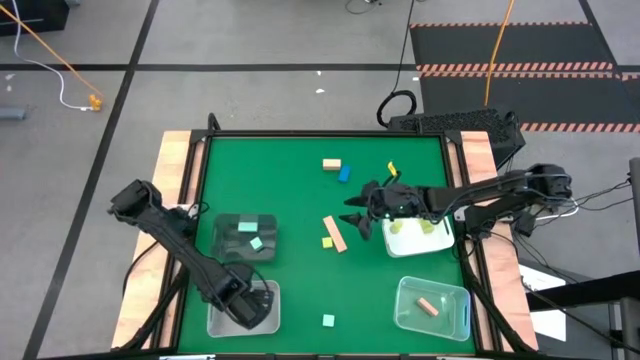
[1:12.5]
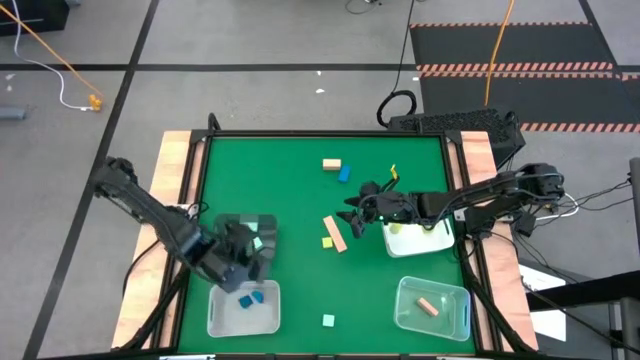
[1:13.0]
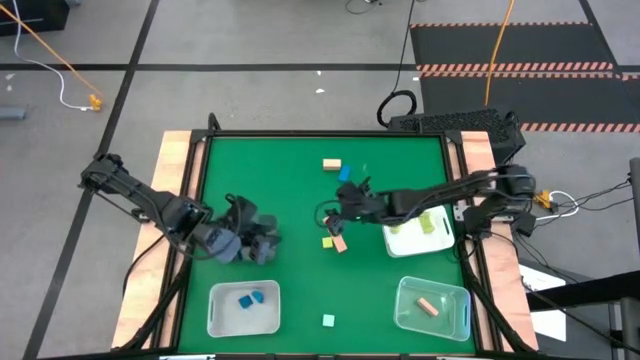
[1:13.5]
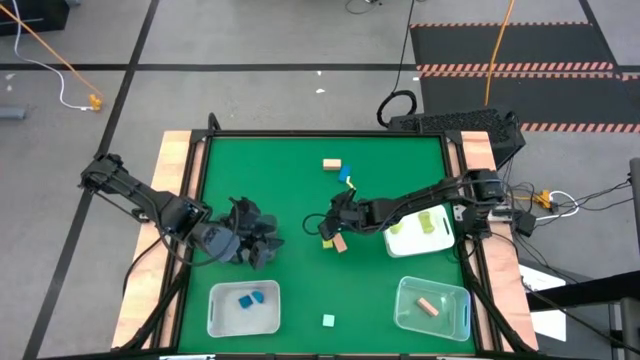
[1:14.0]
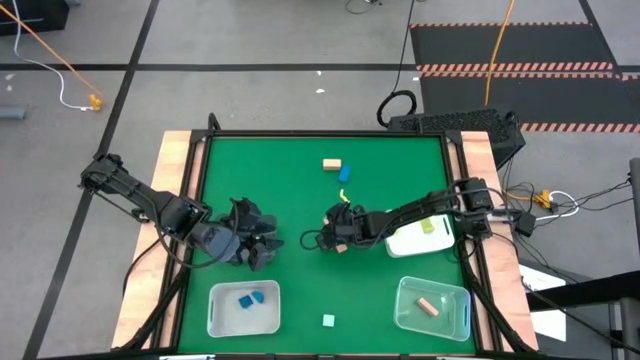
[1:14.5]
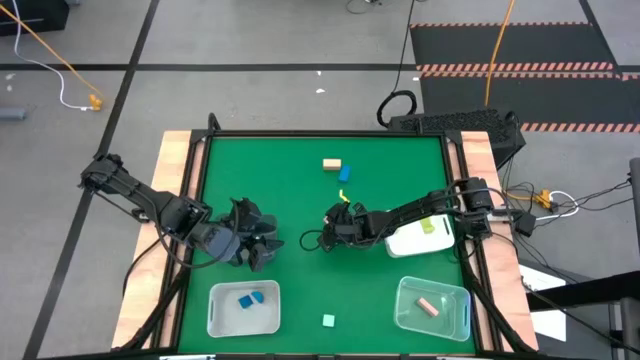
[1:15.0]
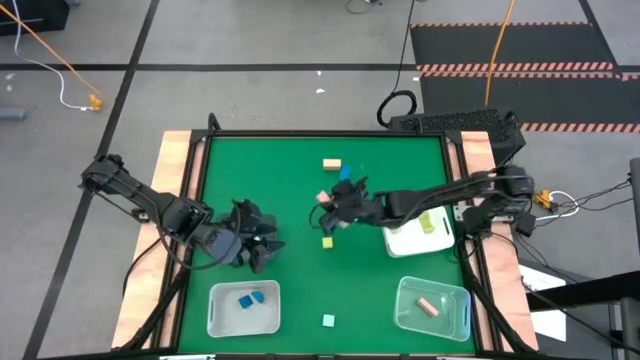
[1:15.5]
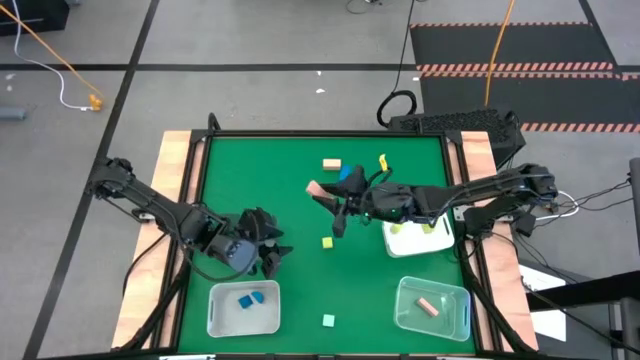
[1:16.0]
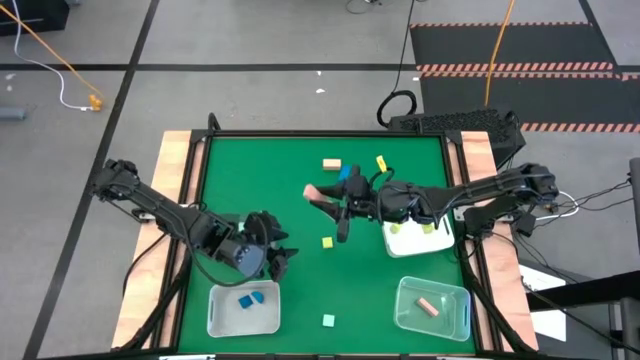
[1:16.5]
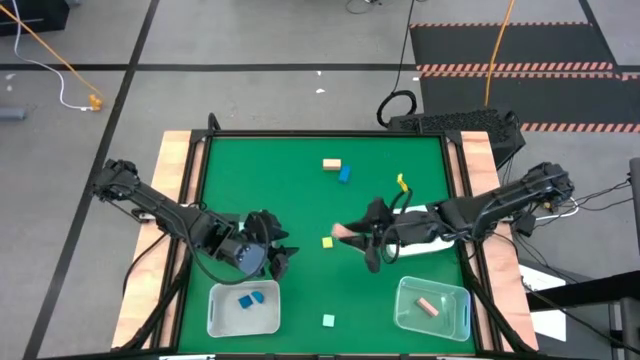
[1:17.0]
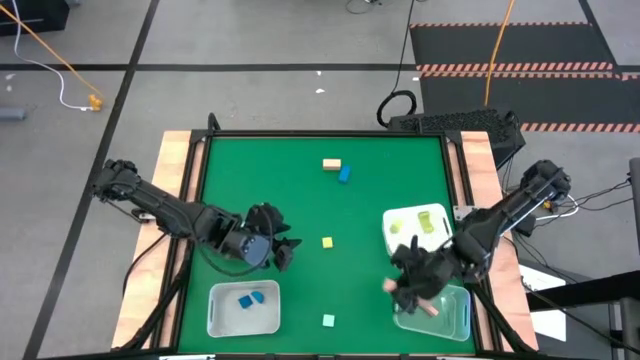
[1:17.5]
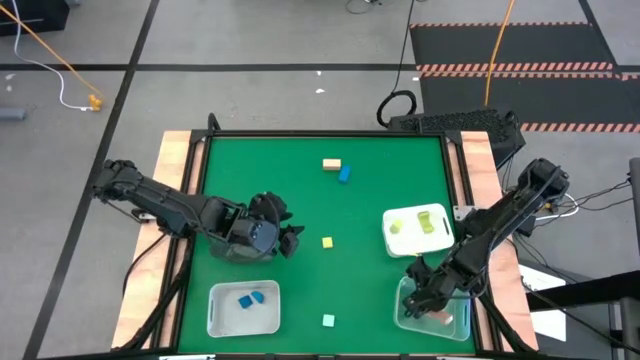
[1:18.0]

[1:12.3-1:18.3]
Task: Sort & place blocks by color
Put the bottom brown block into the bin

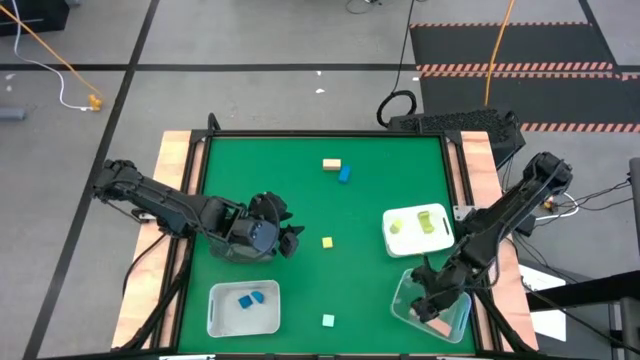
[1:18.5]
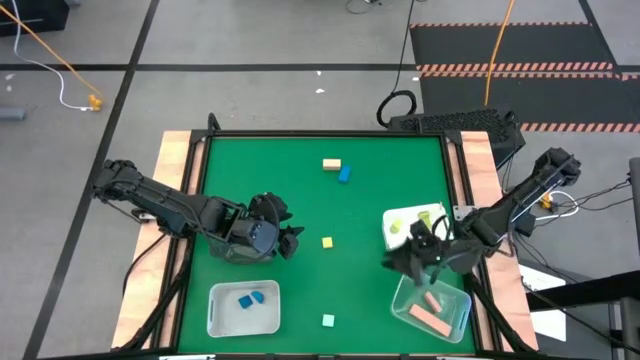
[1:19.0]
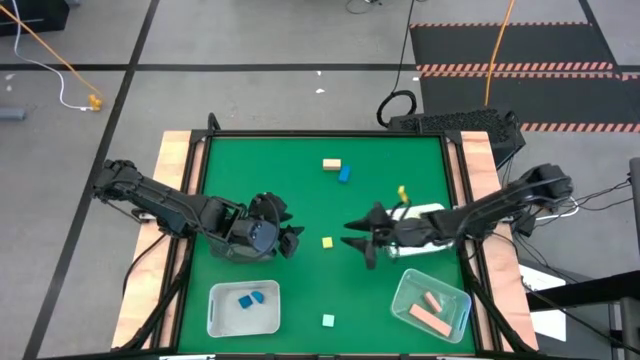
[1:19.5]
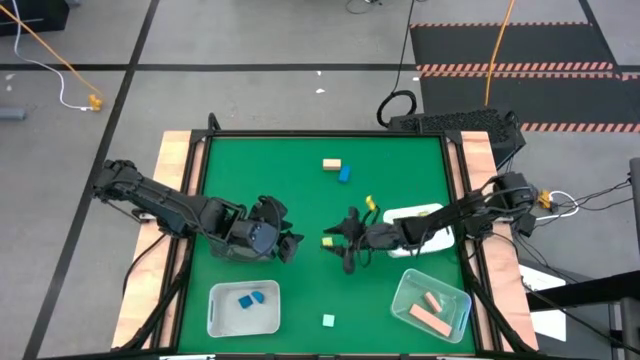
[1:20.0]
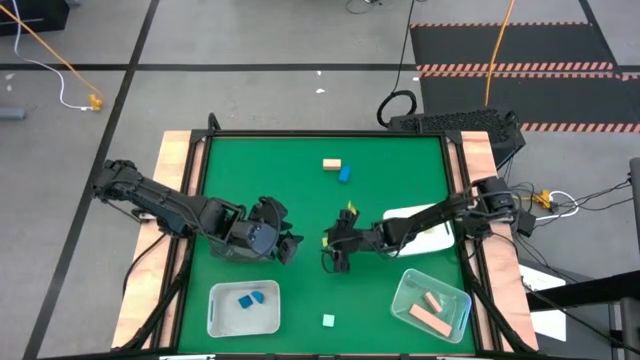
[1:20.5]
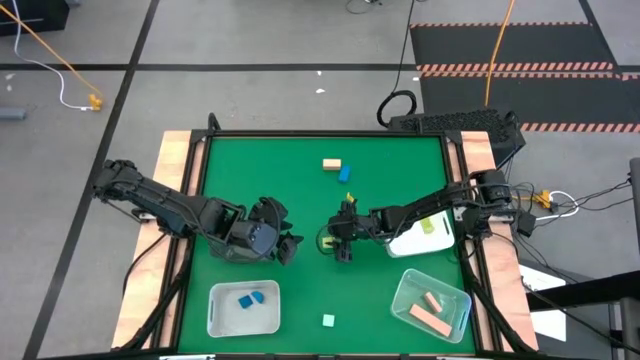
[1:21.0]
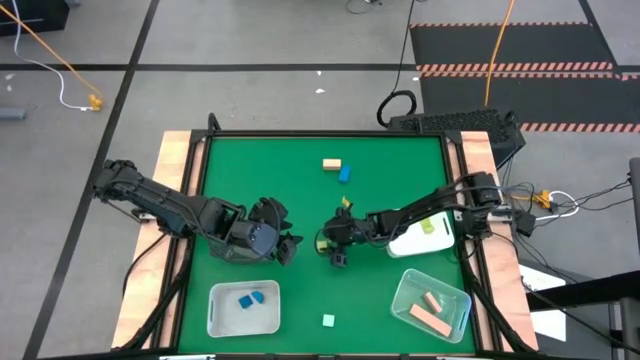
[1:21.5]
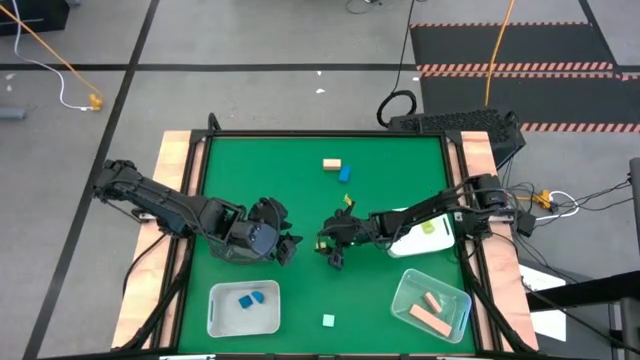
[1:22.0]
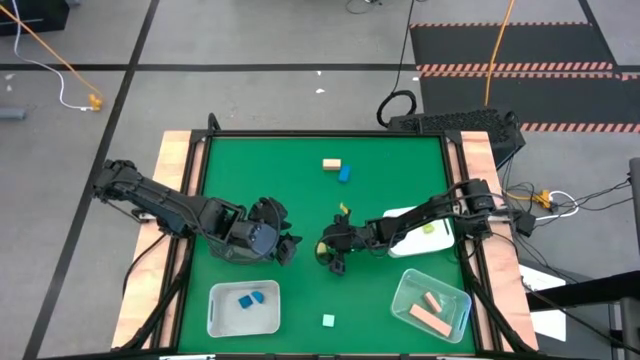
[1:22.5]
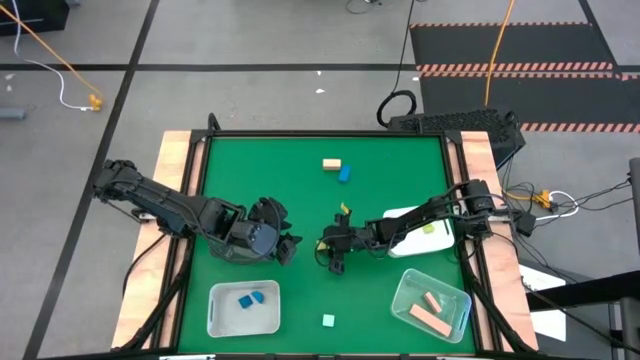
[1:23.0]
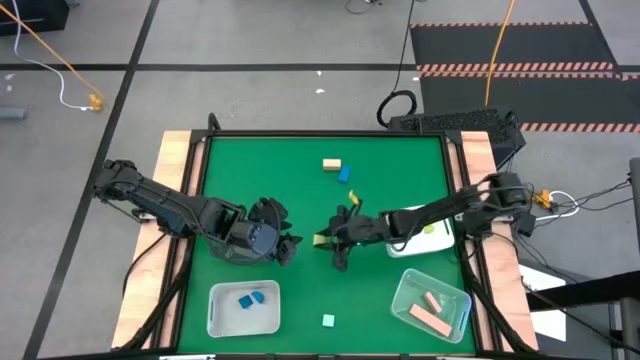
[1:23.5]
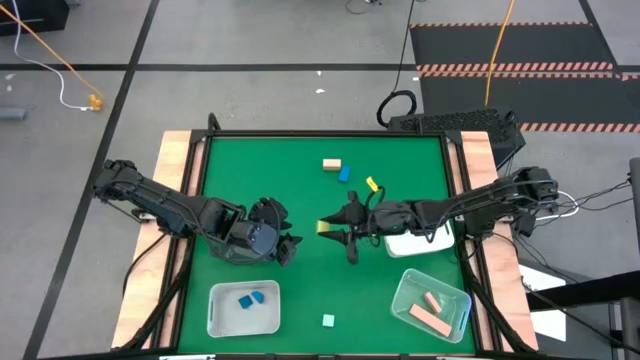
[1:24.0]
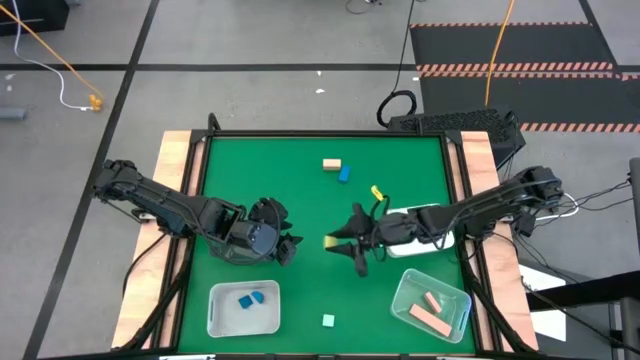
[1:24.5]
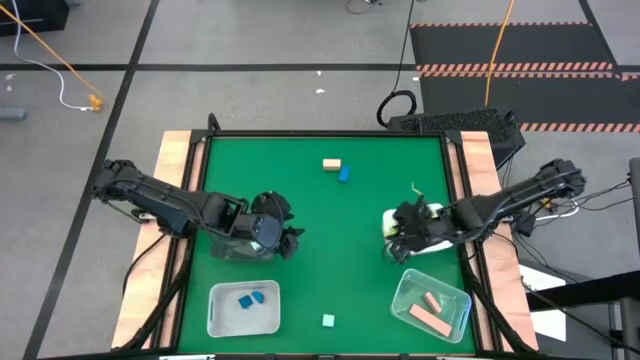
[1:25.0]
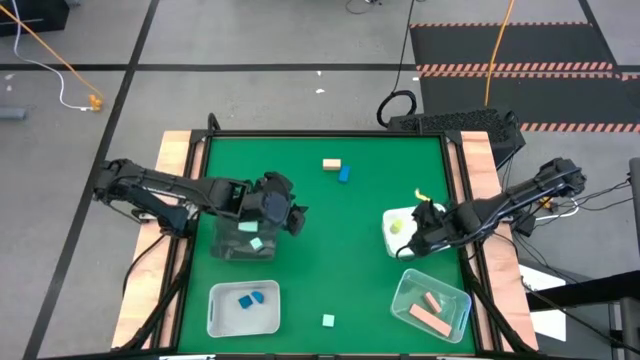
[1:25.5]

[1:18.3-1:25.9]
Put the green block into the white bin

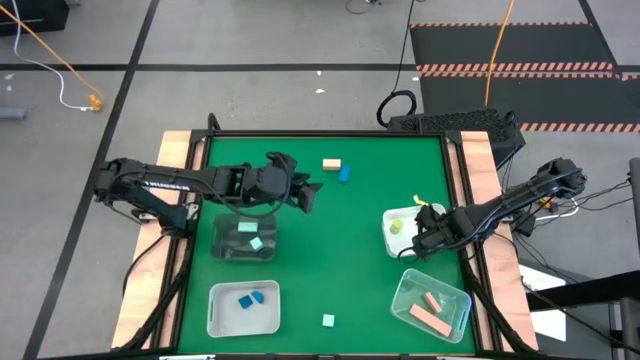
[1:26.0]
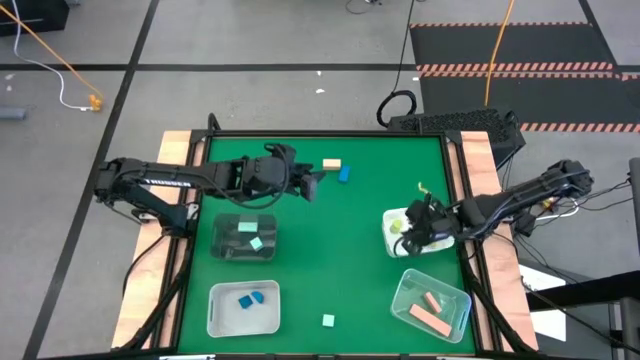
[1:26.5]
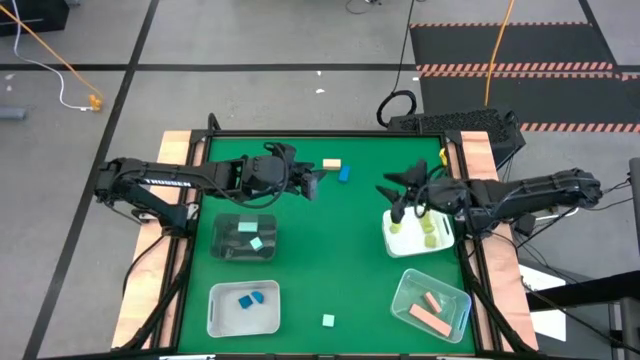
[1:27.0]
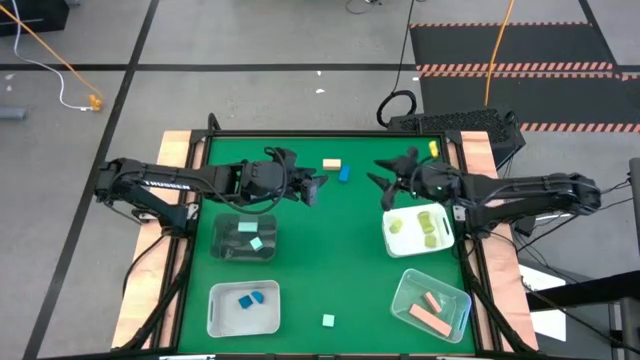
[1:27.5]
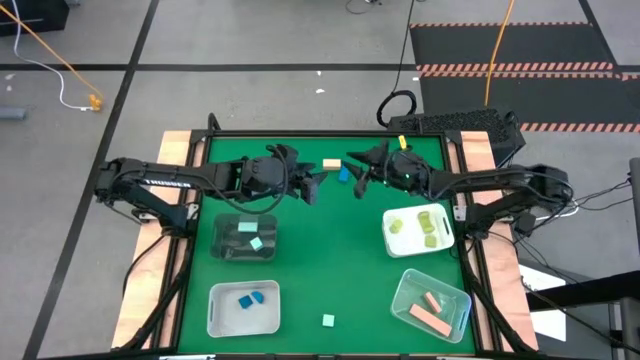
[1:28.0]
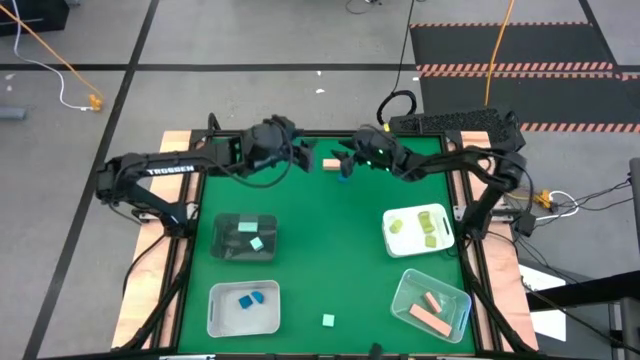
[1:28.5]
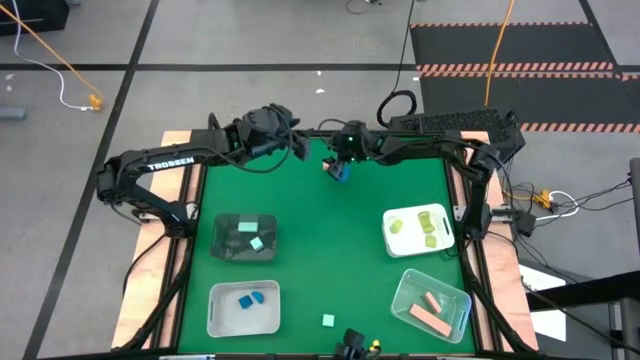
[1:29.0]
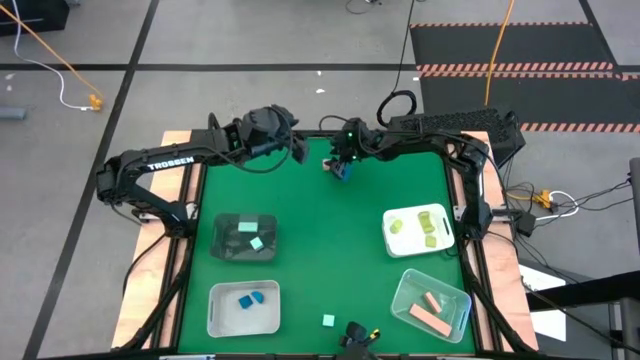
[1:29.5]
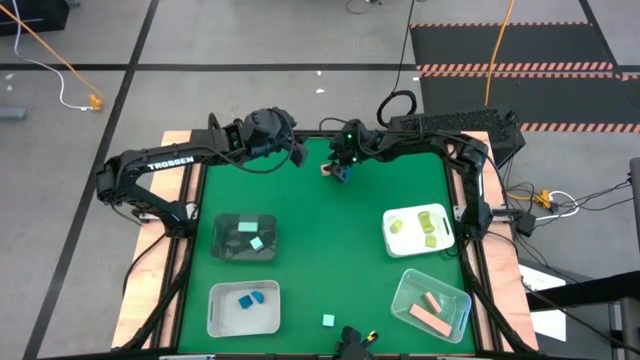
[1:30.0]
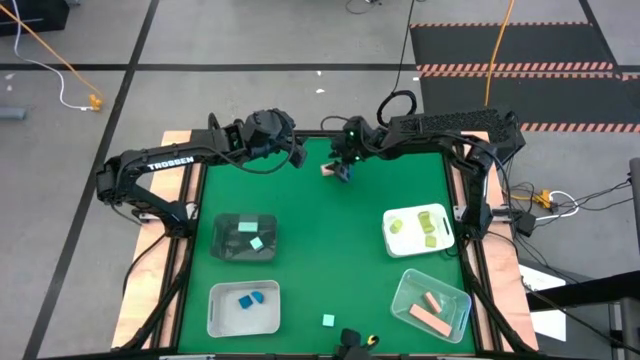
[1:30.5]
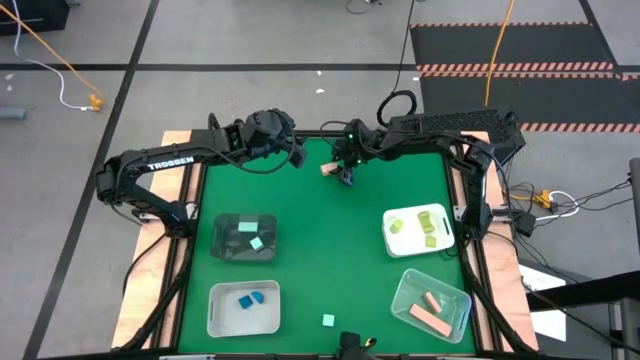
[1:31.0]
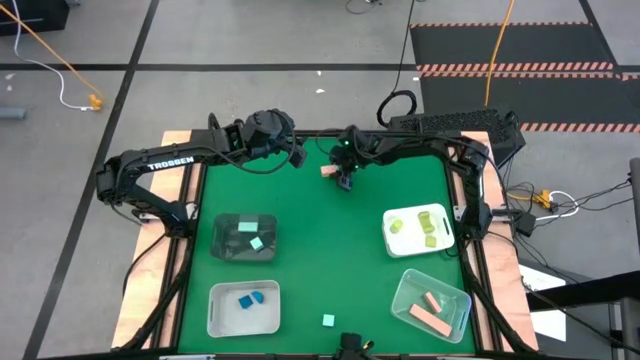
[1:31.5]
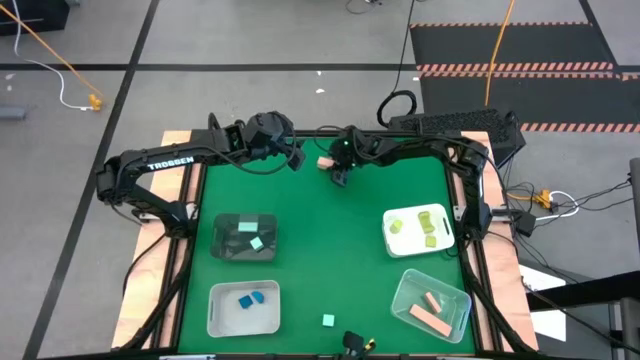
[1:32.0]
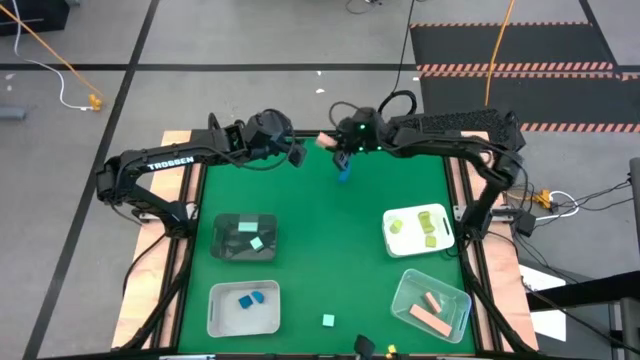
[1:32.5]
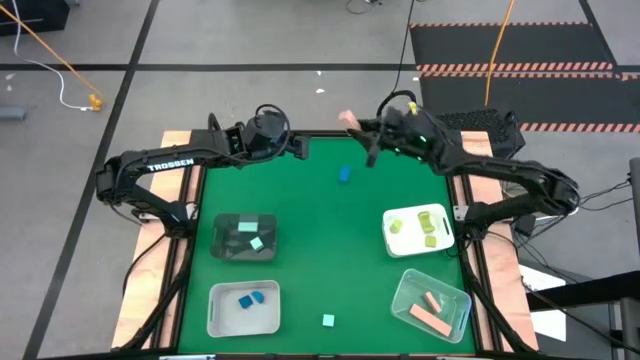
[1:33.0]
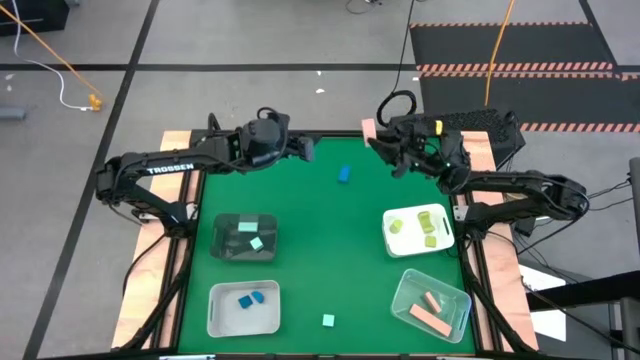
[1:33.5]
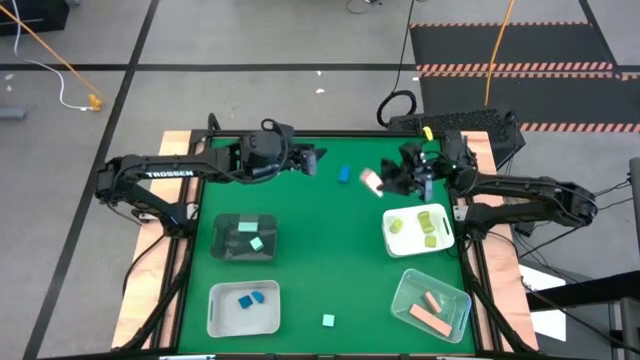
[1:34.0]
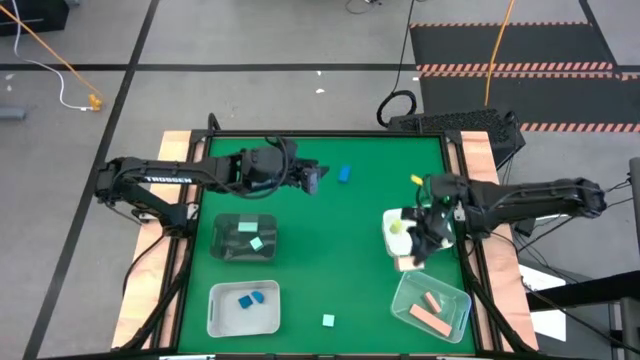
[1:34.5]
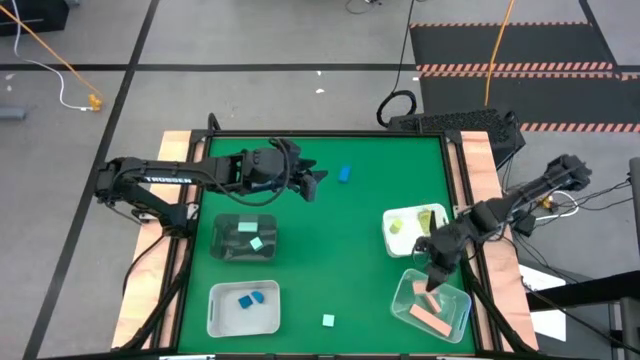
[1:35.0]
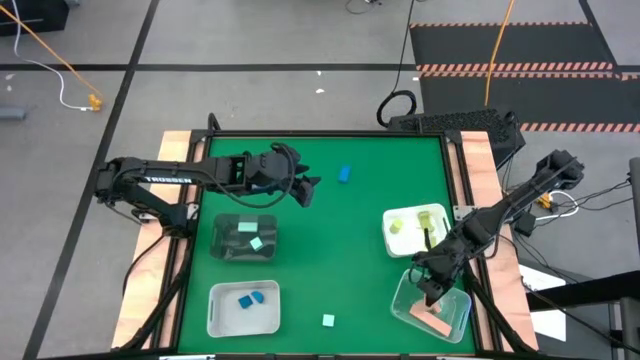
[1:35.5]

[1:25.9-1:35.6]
Put the brown block into the transparent bin
